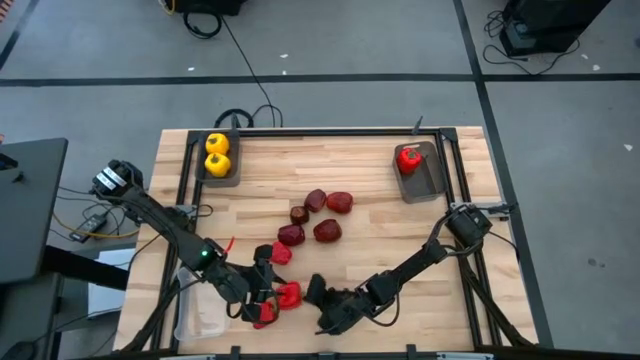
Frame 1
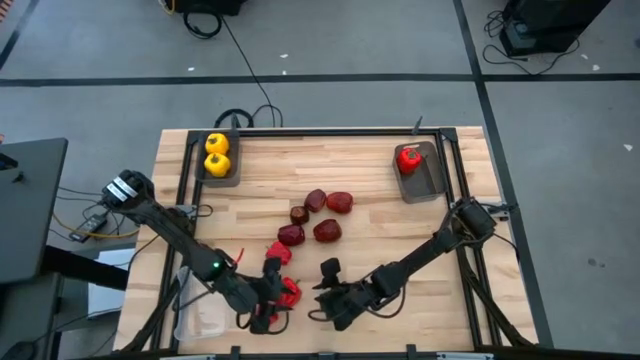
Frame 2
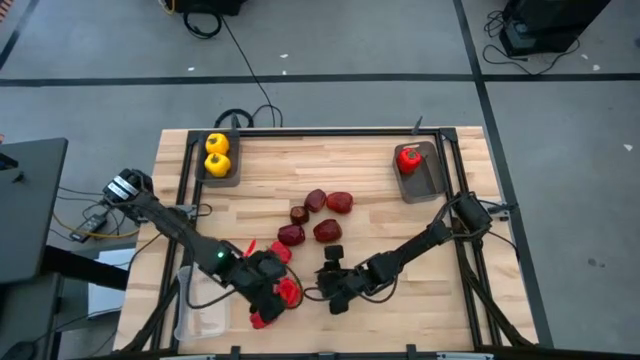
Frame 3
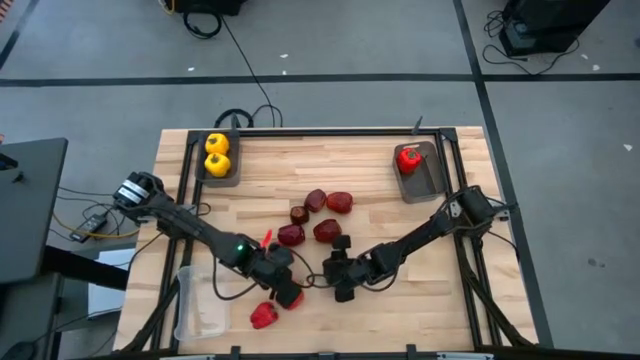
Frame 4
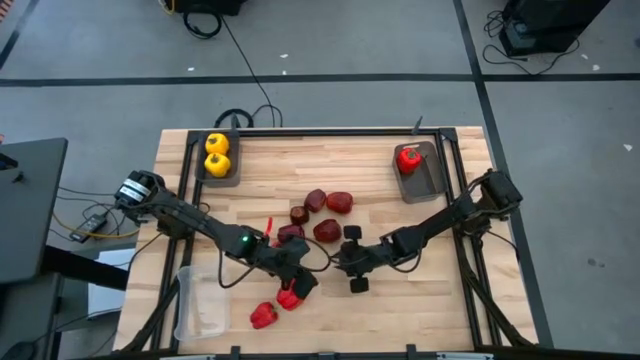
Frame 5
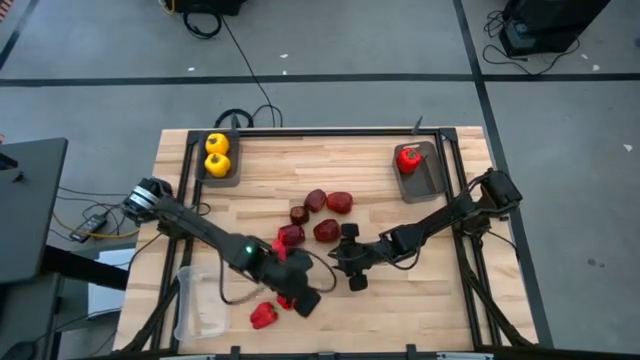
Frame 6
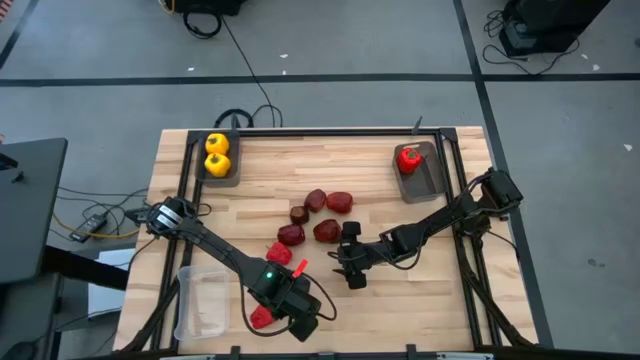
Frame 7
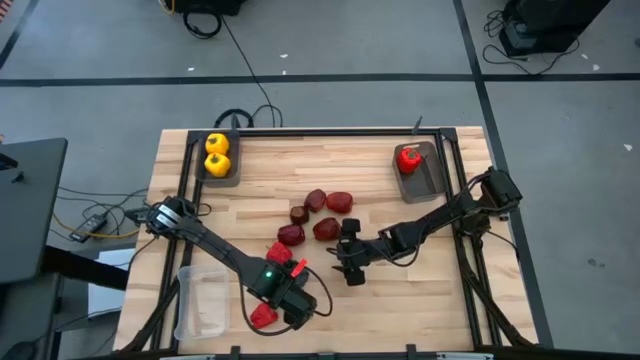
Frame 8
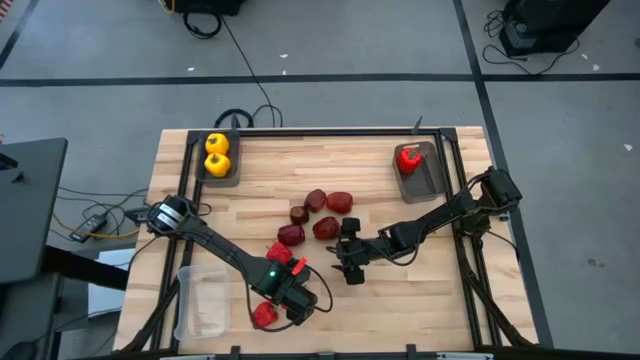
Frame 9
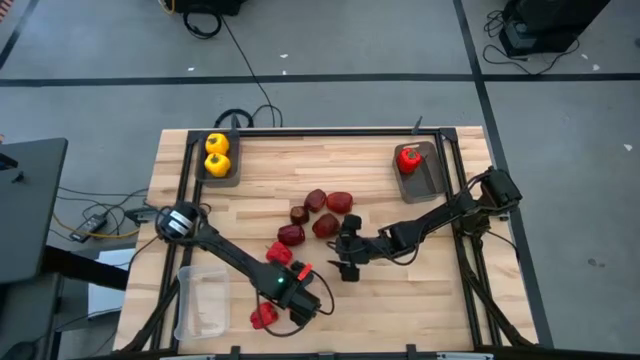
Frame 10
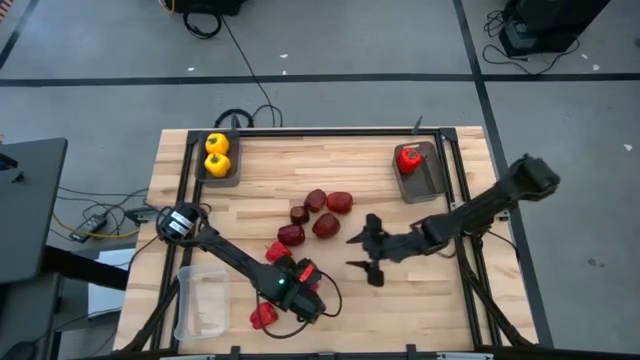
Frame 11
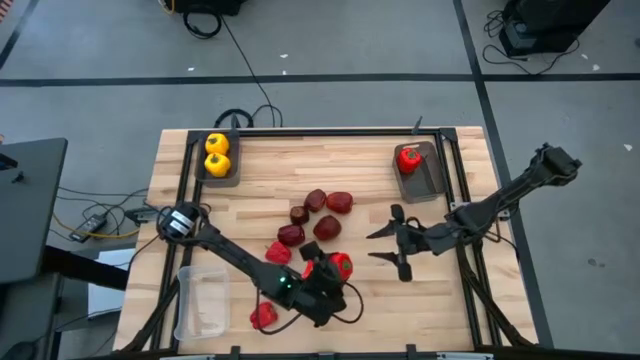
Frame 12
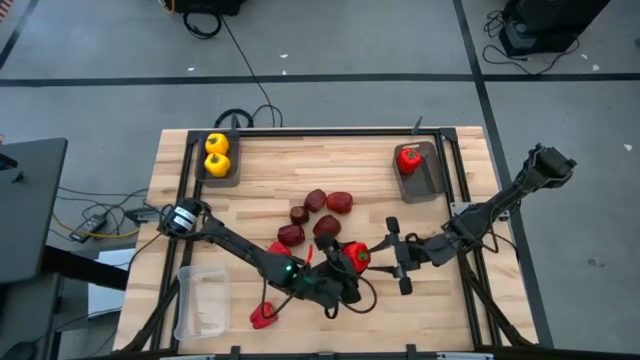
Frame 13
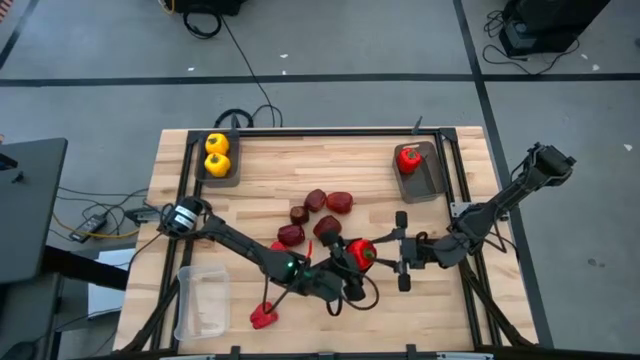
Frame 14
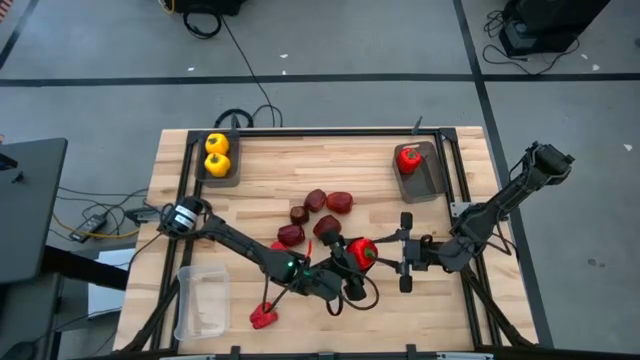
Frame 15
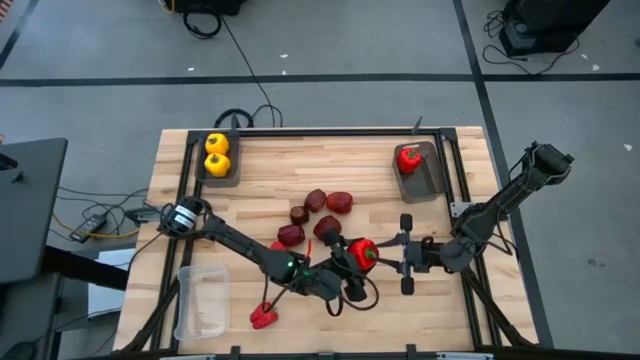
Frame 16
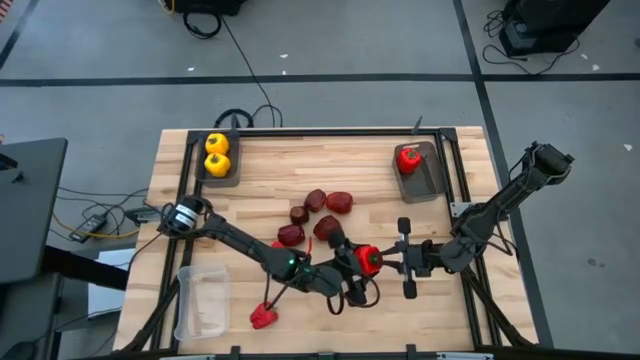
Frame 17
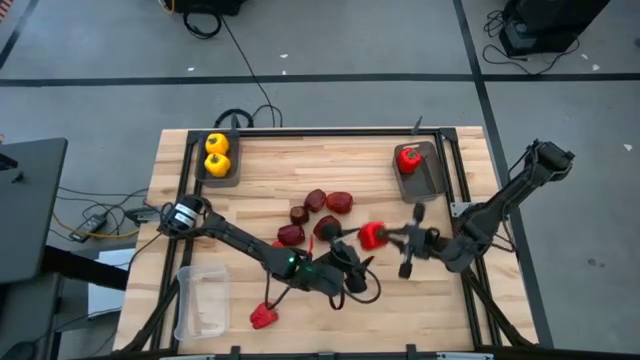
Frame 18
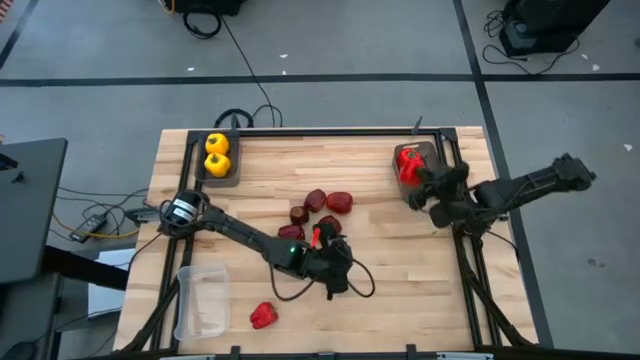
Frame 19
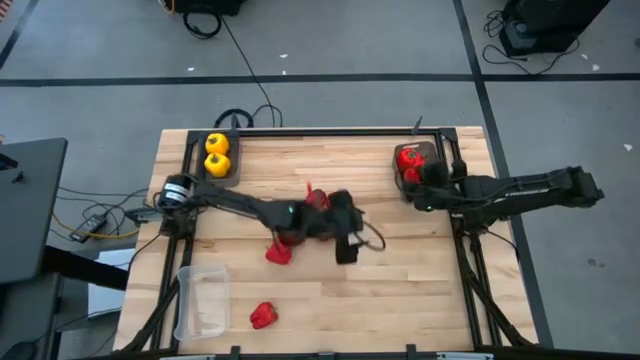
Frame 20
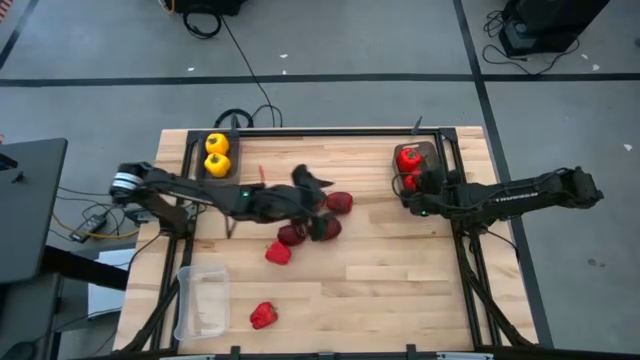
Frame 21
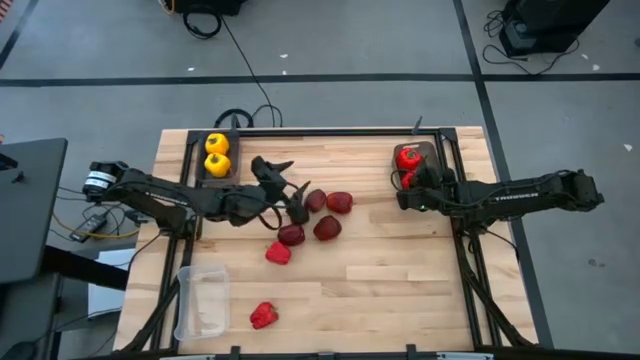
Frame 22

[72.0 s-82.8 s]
Task: Sort produce into baskets
Put the red bell pepper into the right black transparent bin

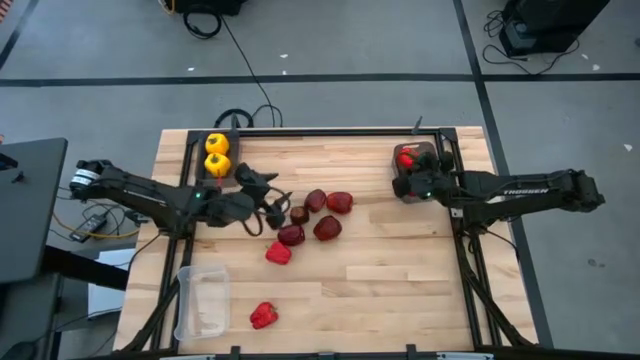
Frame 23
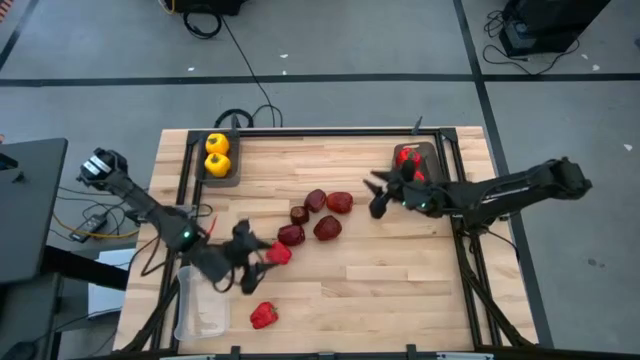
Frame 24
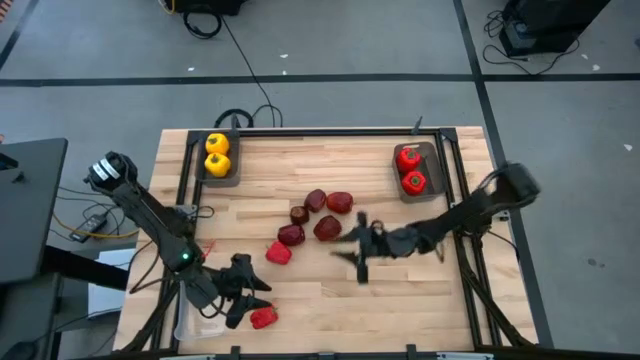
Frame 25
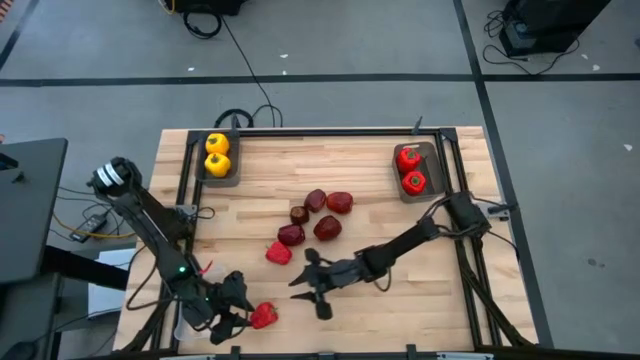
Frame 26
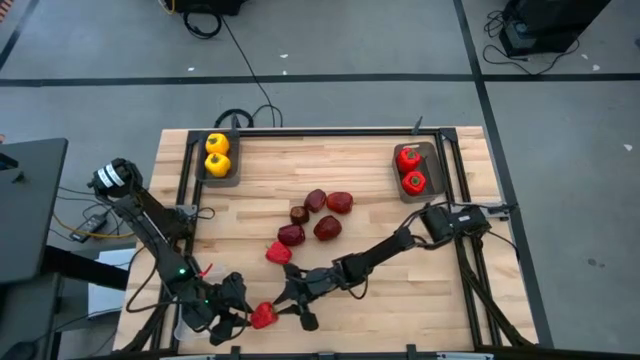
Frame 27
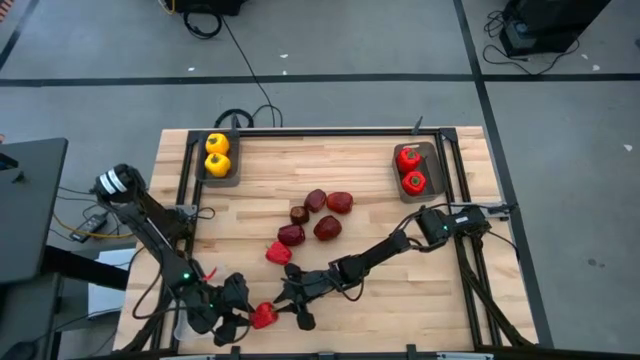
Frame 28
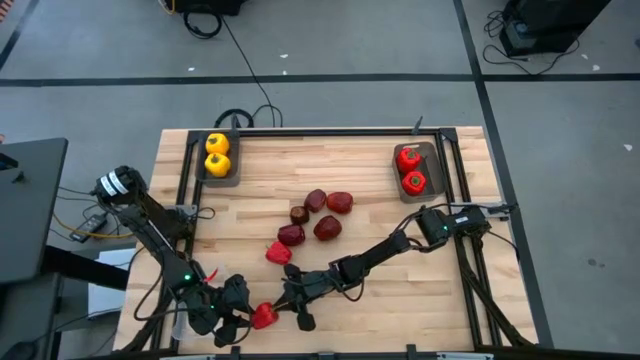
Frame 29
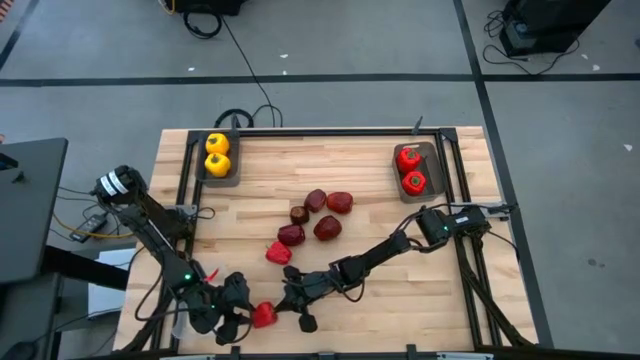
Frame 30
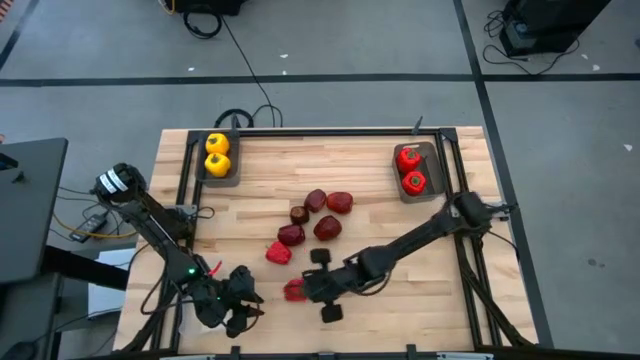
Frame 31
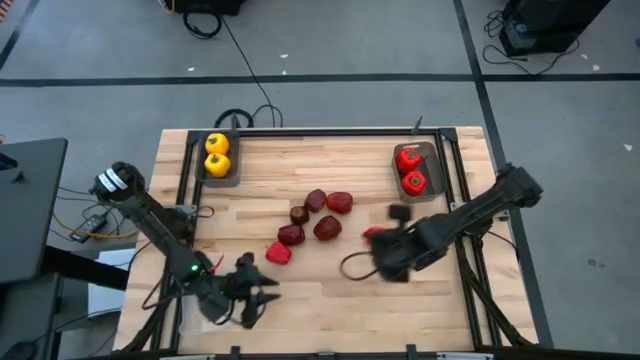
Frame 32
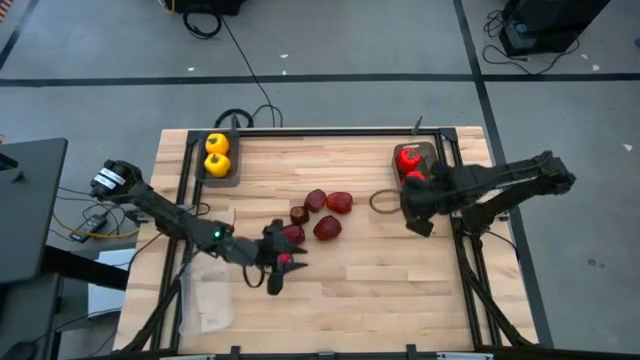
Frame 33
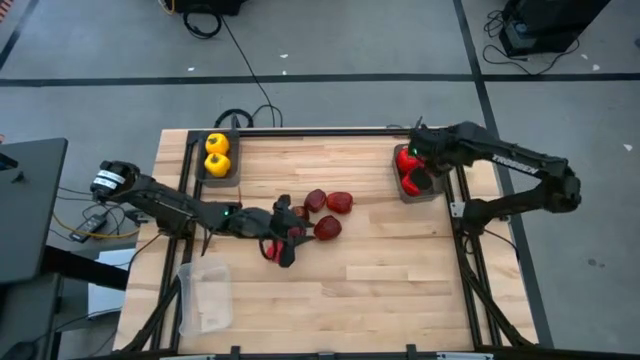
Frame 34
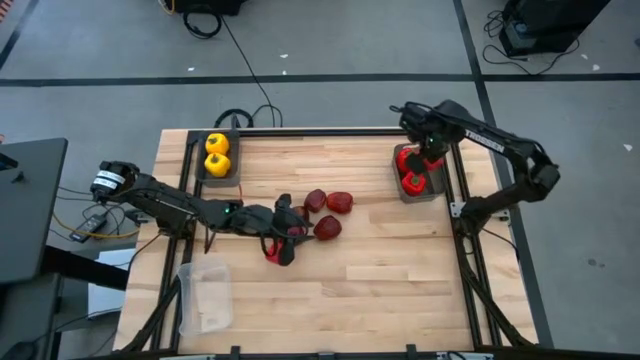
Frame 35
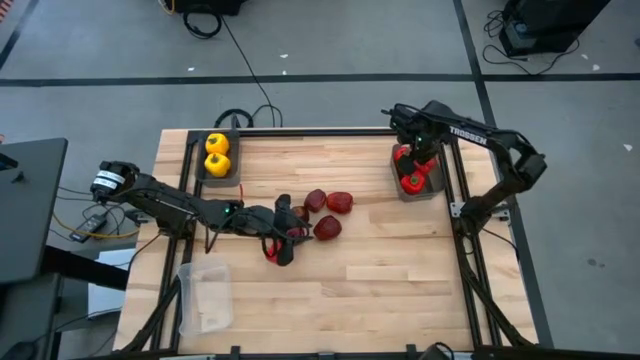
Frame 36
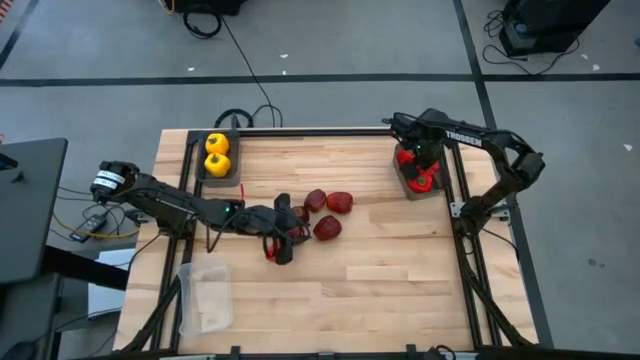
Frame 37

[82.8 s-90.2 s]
Put the red bell pepper into the right black transparent bin

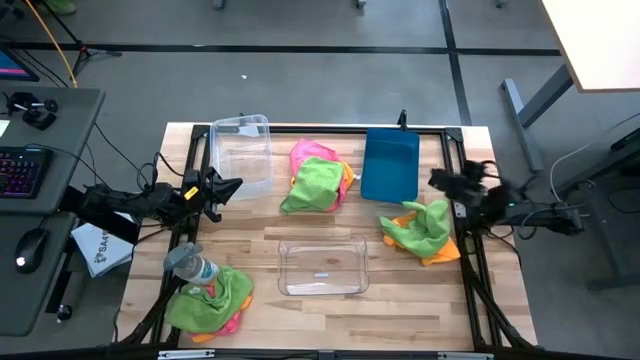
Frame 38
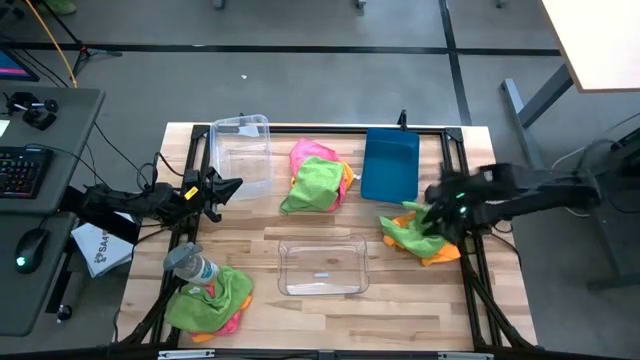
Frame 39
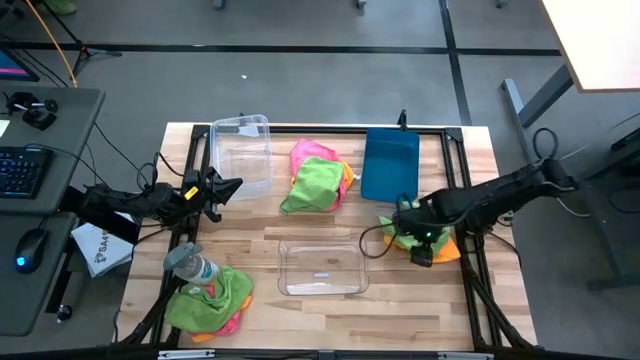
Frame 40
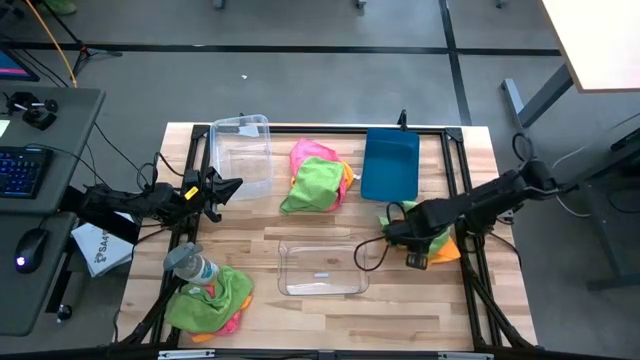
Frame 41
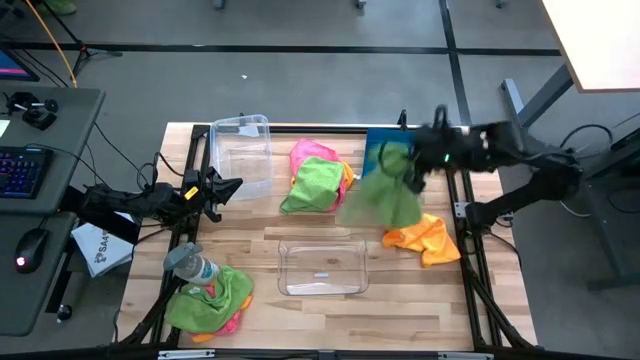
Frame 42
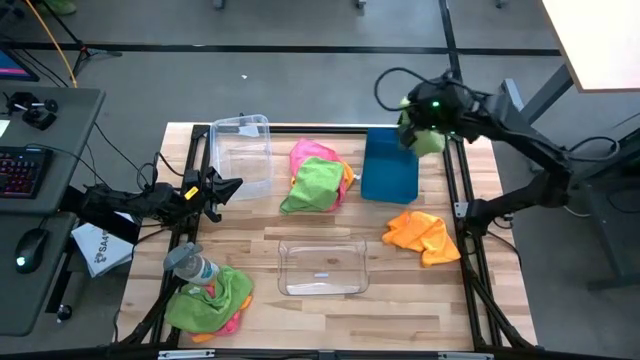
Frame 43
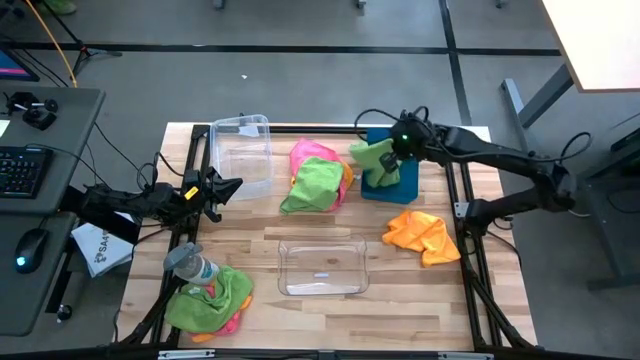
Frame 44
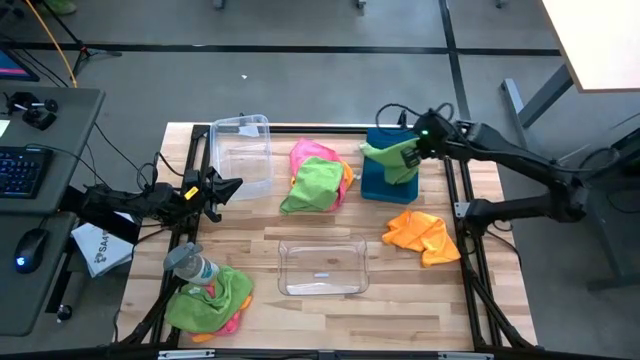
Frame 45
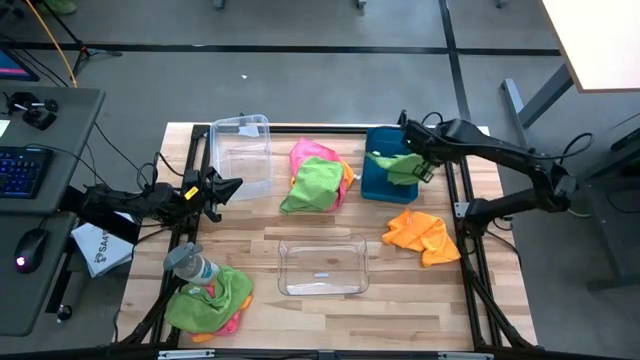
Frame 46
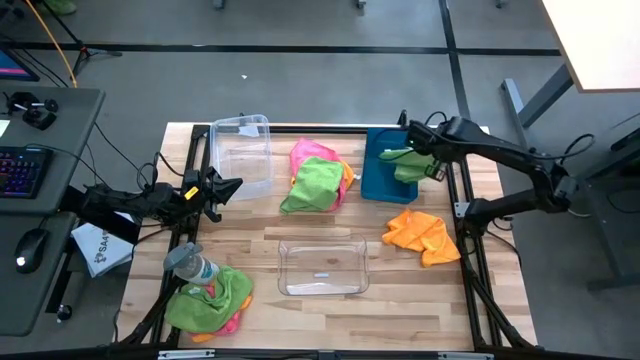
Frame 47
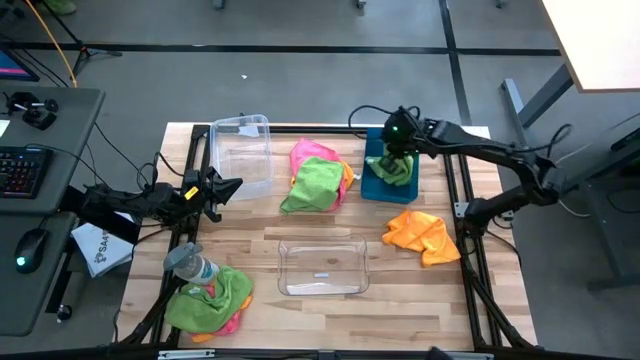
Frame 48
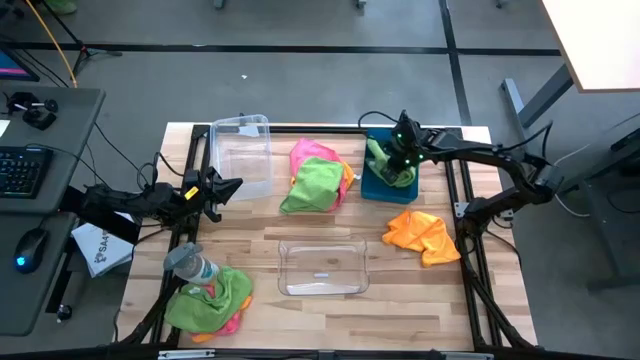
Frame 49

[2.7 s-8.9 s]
Task: Sort microfiber towel by color & place in baskets
Put the middle right green microfiber towel into the blue bin
